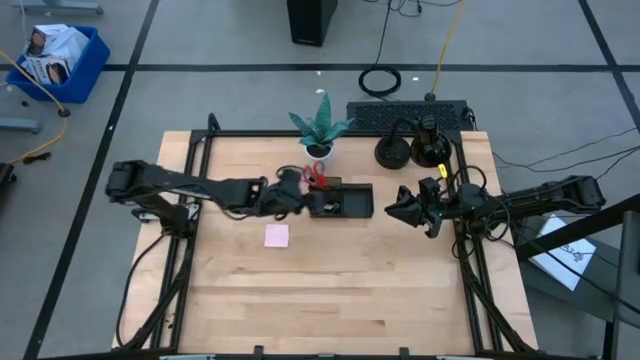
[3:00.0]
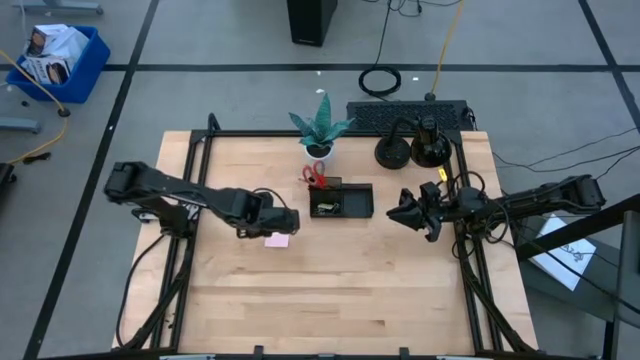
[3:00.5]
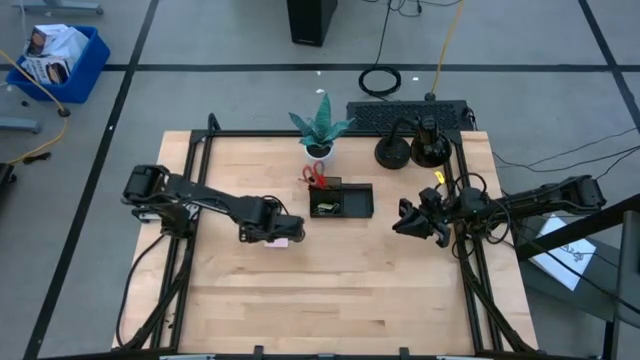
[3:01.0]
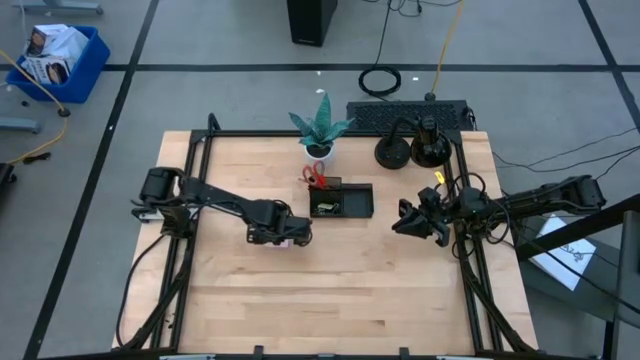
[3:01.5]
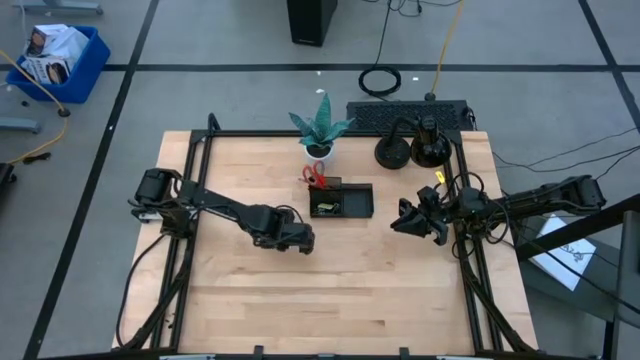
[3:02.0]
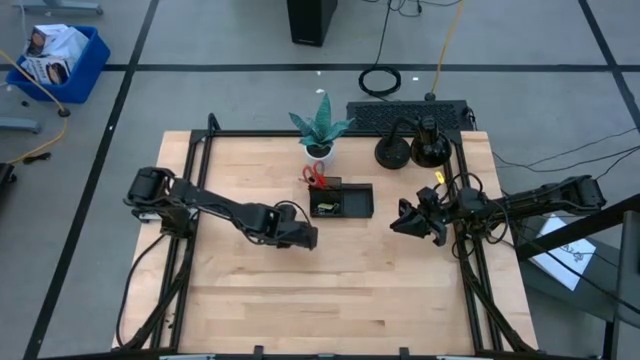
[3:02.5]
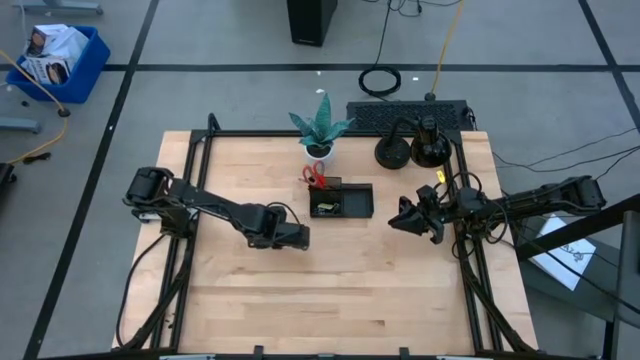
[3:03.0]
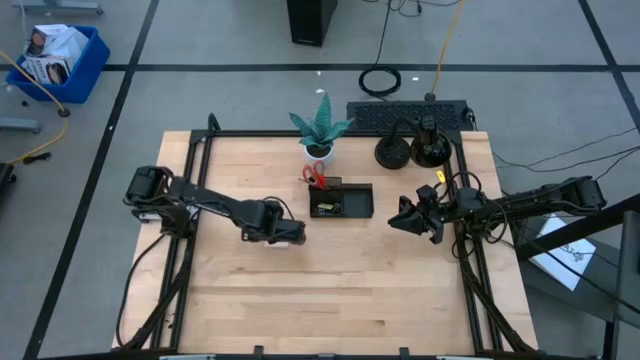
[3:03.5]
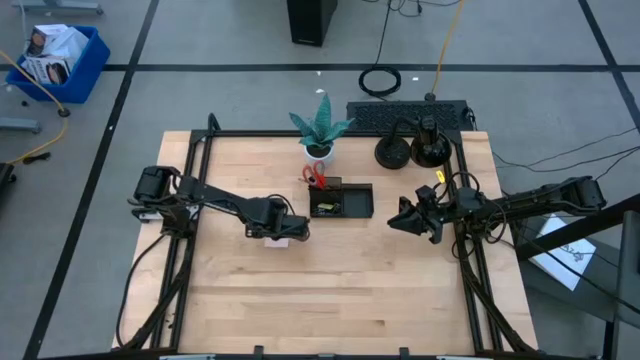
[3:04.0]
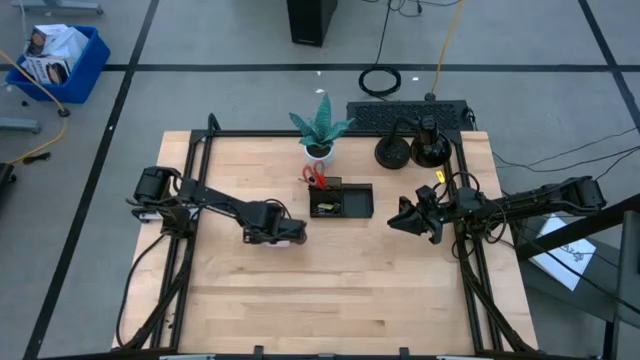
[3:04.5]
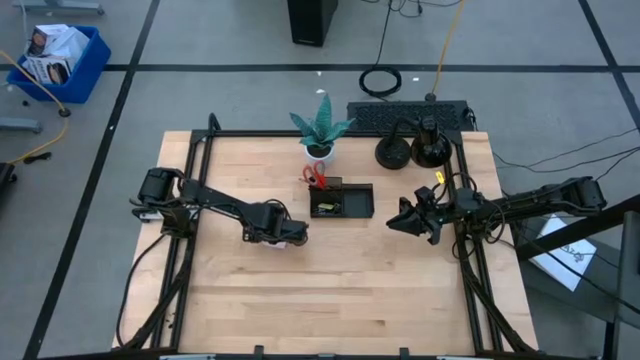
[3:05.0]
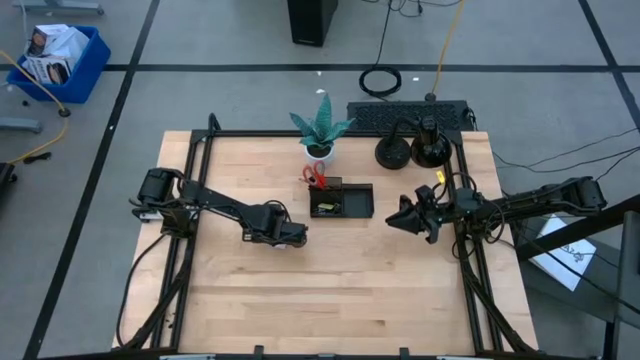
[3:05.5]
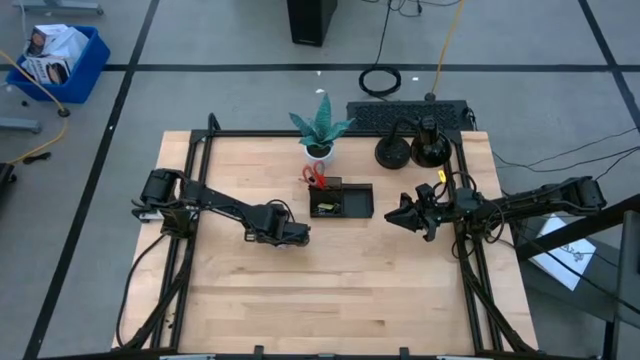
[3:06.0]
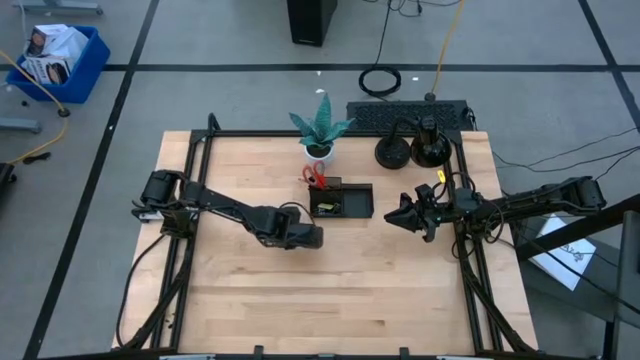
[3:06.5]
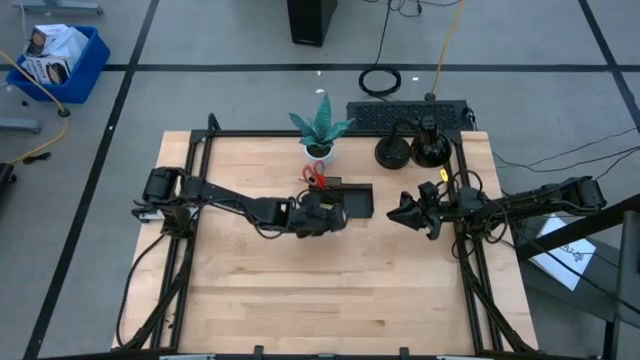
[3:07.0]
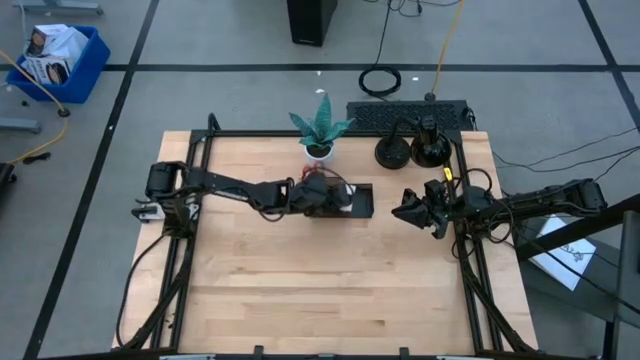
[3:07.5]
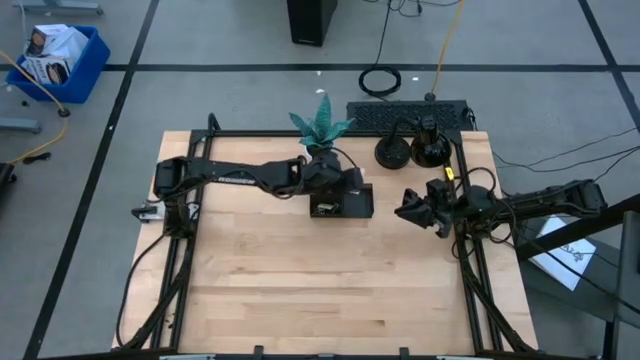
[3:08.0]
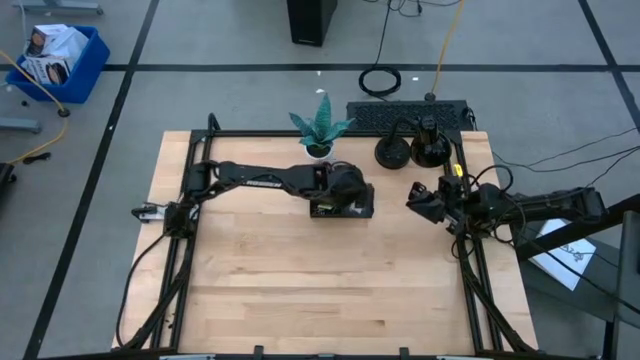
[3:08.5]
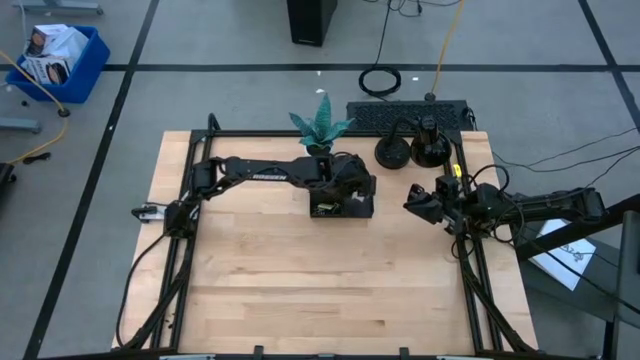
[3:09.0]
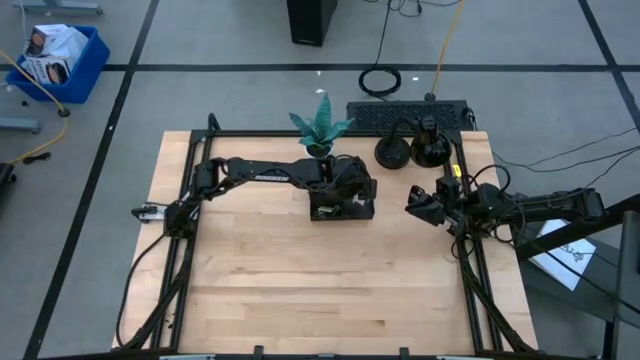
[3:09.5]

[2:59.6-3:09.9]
Task: Pick and place office supplies into organizer
Put the pink sticky notes into the black desk organizer

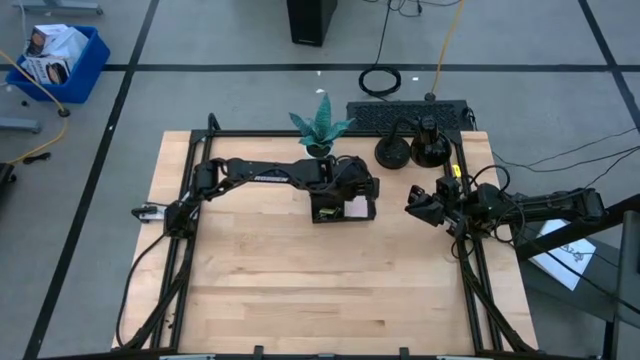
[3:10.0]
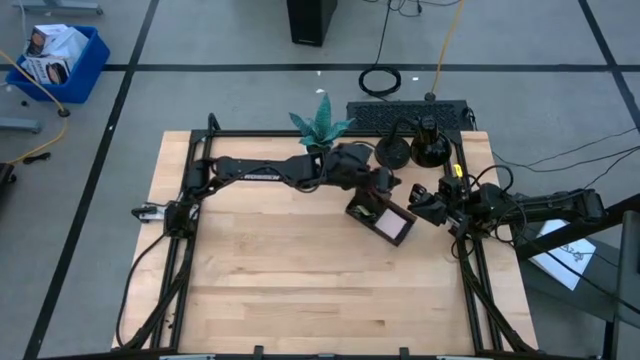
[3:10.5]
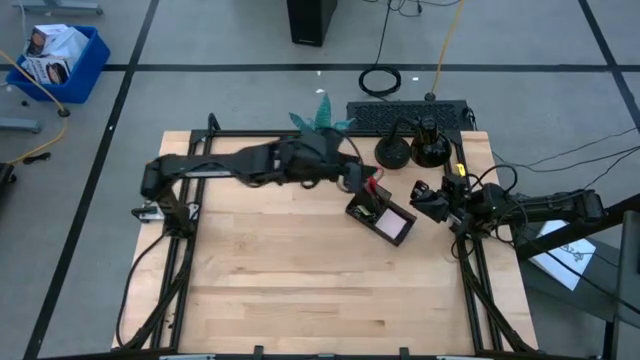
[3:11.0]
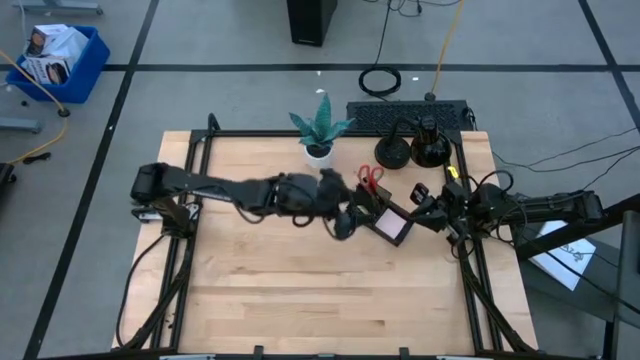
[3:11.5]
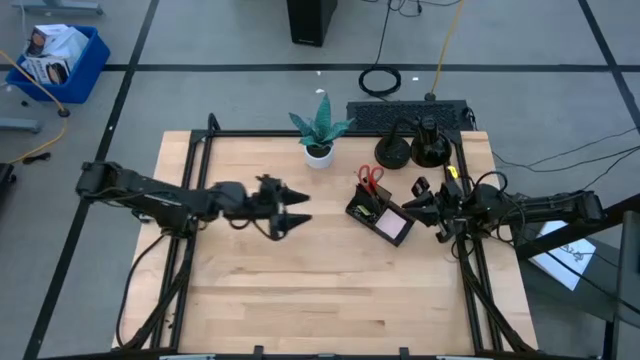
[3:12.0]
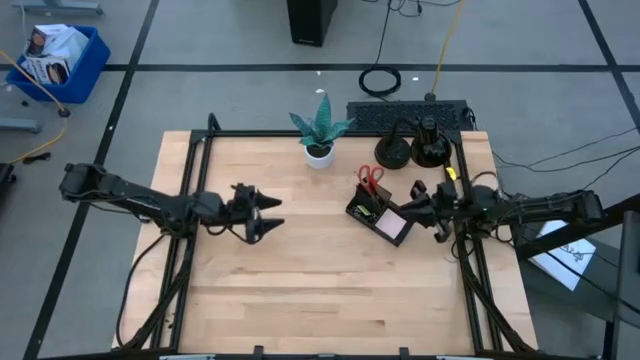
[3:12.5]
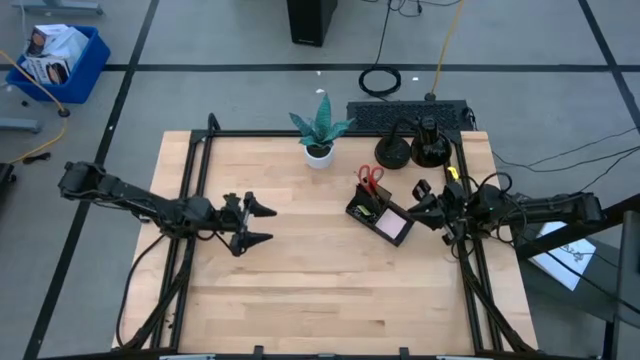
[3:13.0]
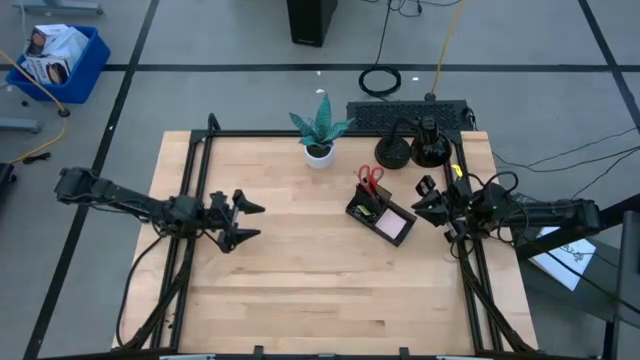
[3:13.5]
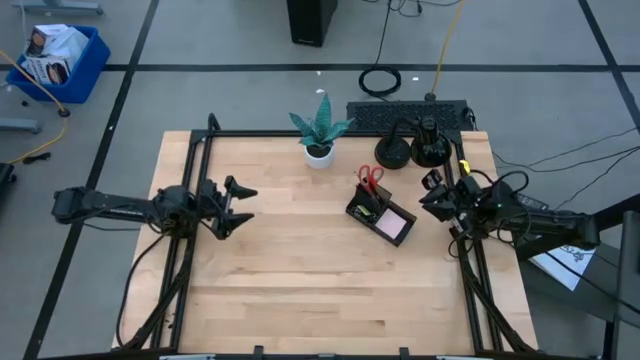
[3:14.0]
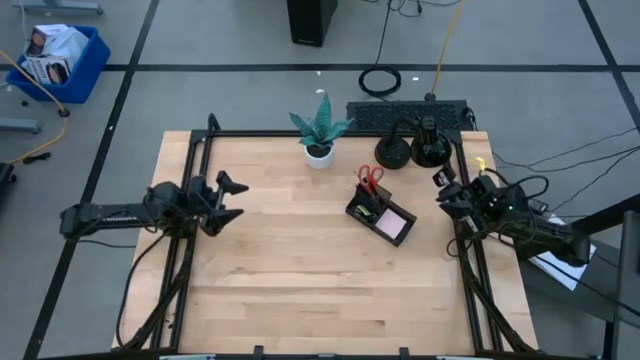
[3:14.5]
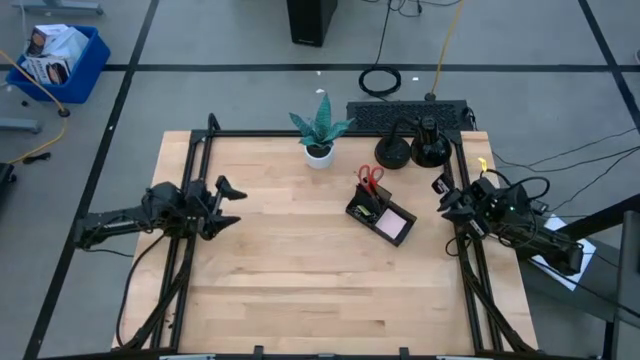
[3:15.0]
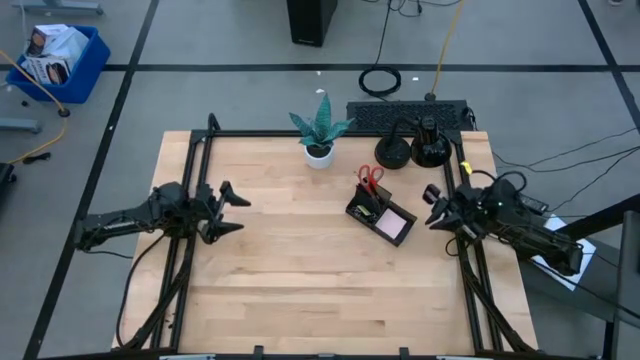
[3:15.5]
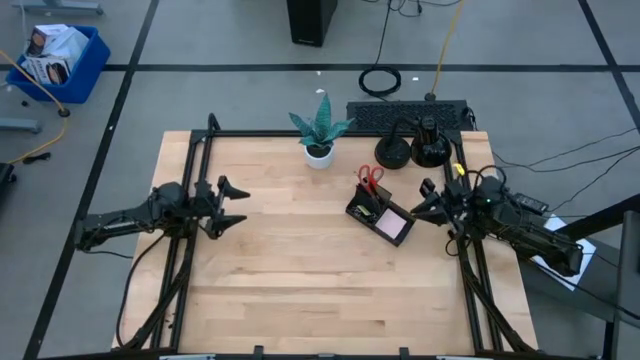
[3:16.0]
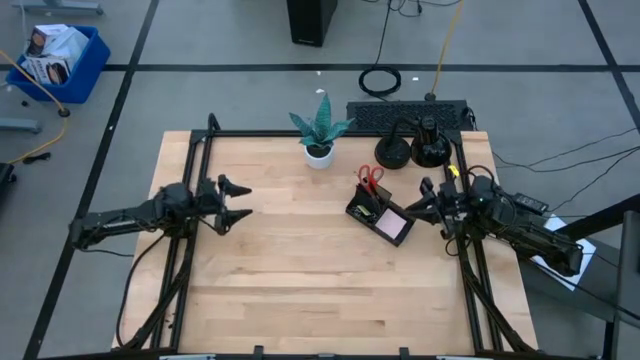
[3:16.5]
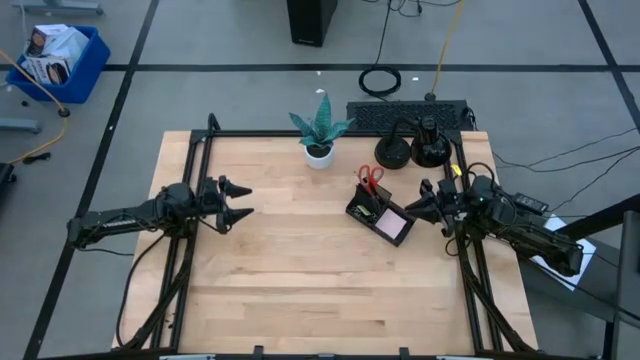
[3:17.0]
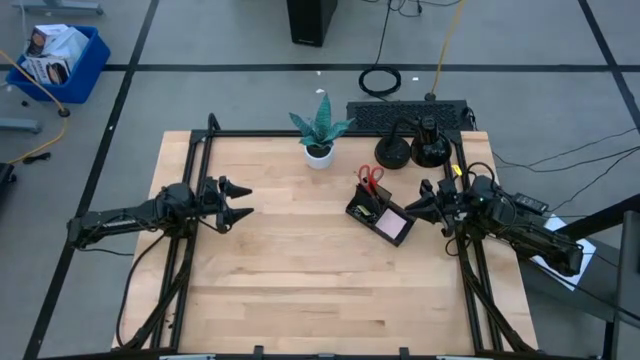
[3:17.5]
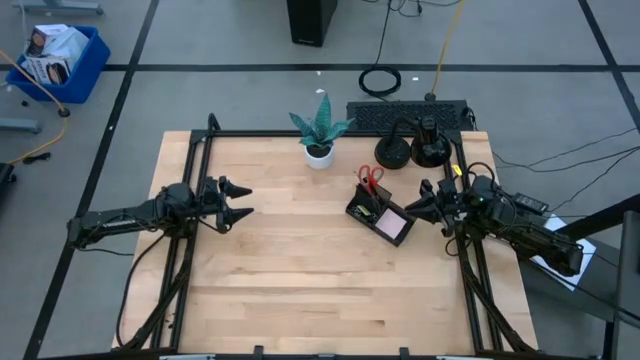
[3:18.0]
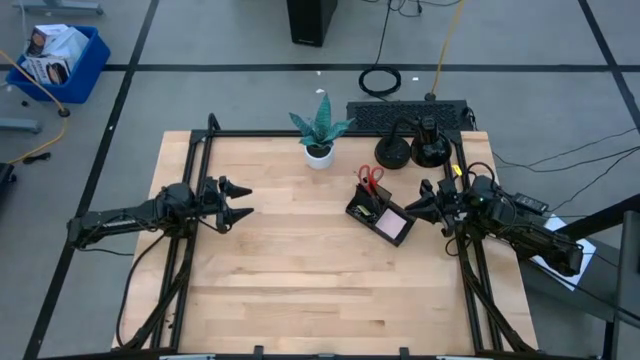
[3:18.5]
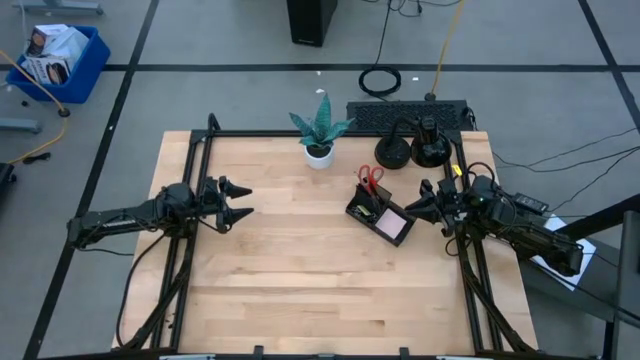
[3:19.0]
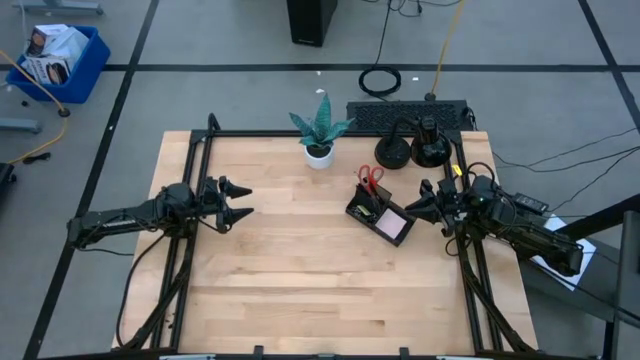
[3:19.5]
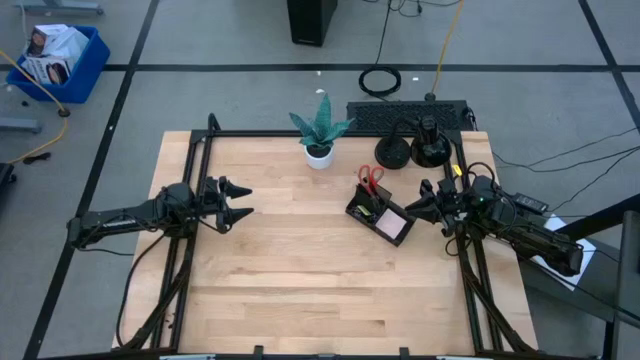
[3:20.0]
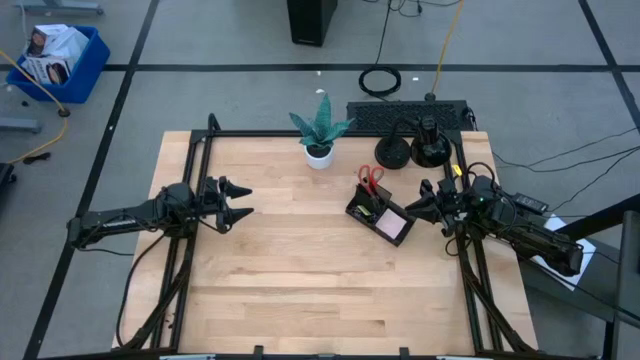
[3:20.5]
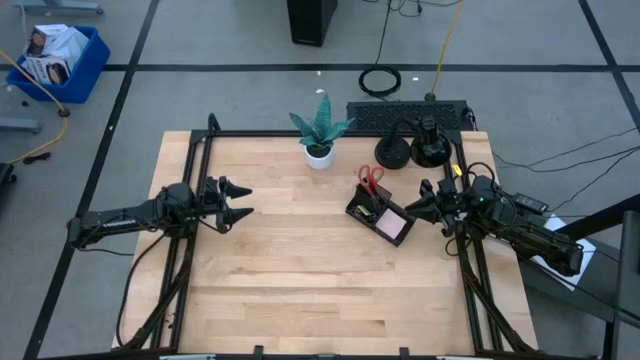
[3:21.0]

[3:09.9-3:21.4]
Return to Home Position
